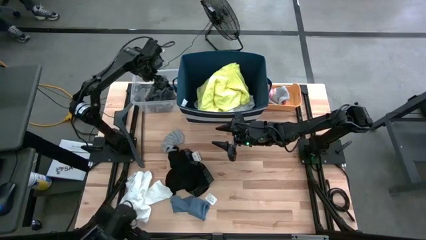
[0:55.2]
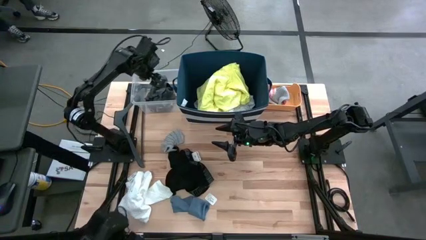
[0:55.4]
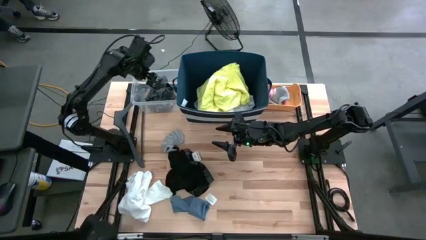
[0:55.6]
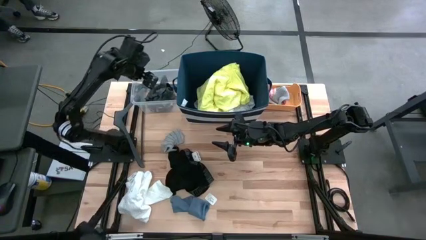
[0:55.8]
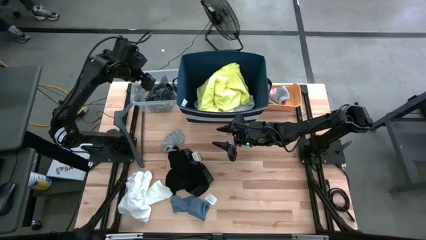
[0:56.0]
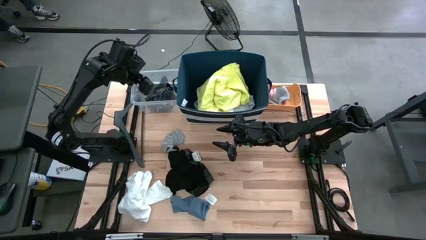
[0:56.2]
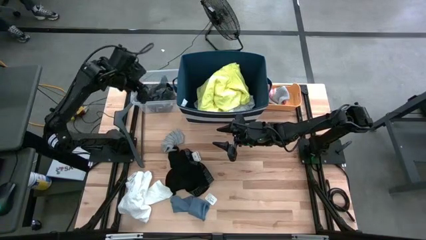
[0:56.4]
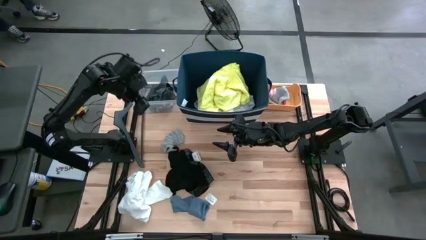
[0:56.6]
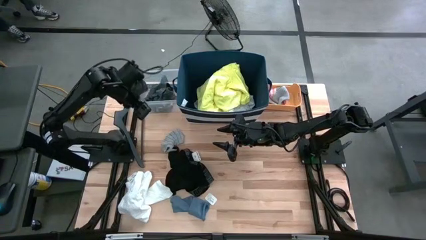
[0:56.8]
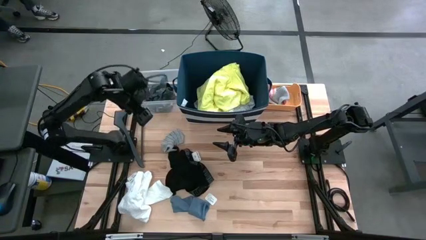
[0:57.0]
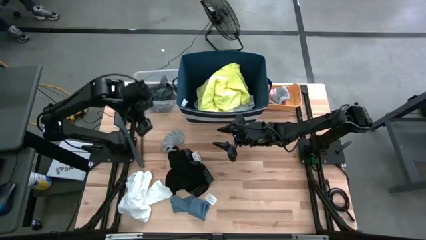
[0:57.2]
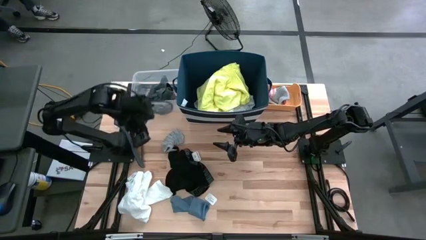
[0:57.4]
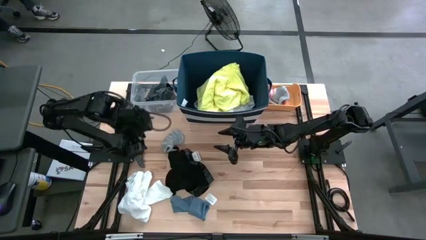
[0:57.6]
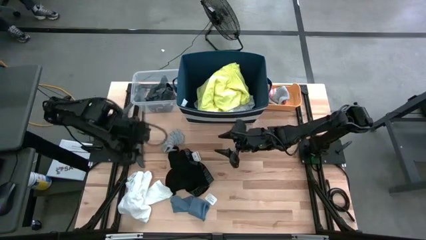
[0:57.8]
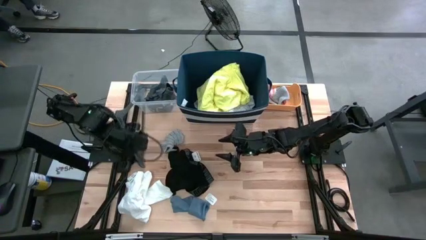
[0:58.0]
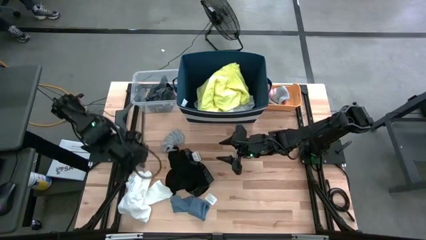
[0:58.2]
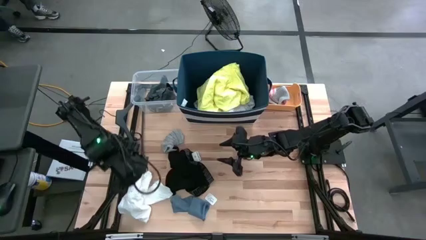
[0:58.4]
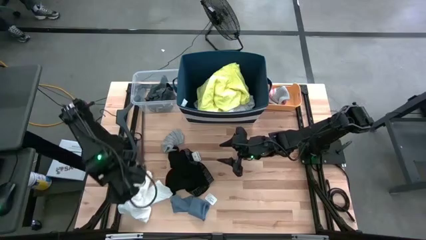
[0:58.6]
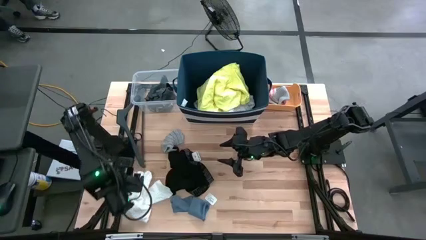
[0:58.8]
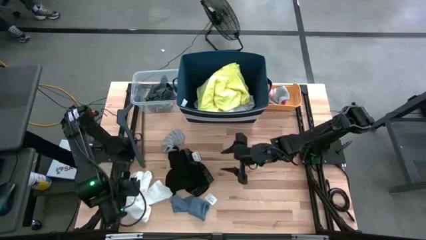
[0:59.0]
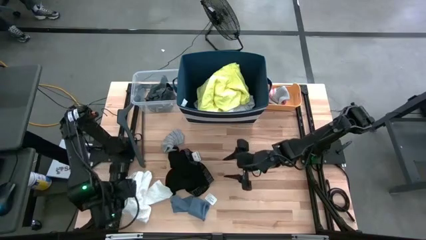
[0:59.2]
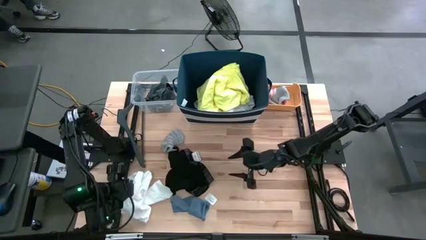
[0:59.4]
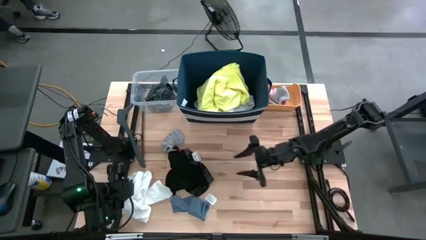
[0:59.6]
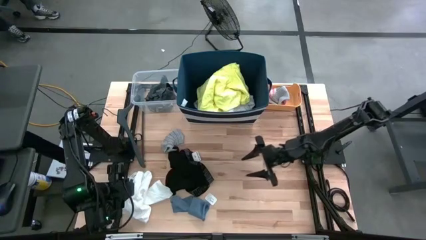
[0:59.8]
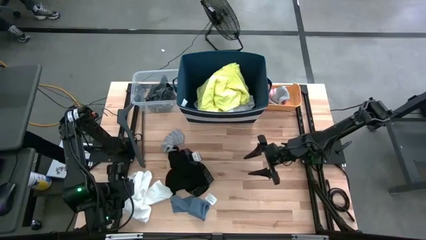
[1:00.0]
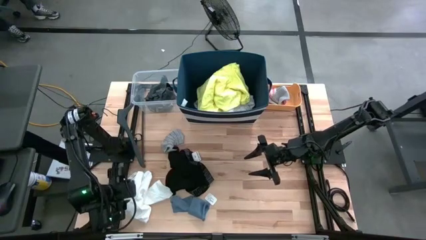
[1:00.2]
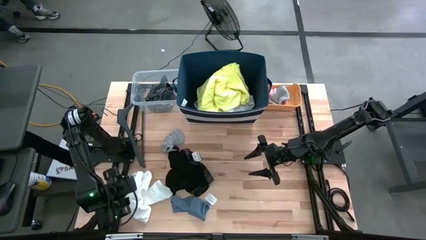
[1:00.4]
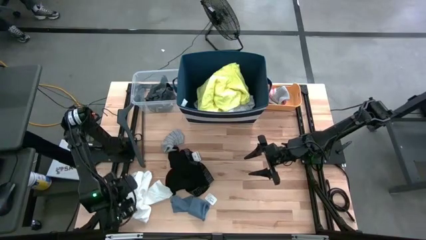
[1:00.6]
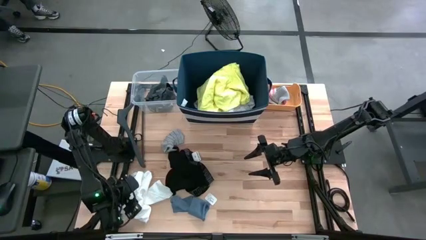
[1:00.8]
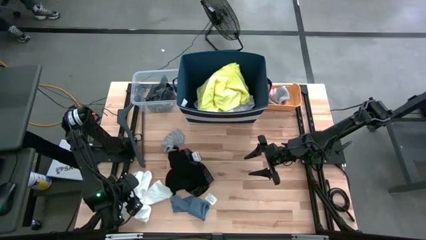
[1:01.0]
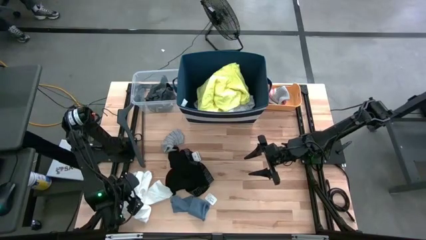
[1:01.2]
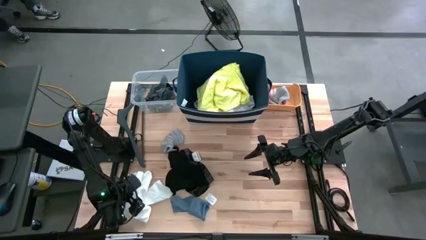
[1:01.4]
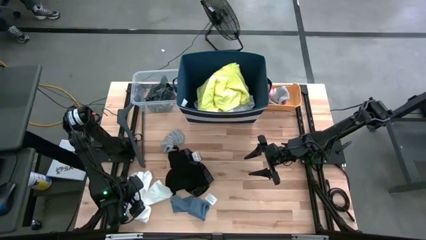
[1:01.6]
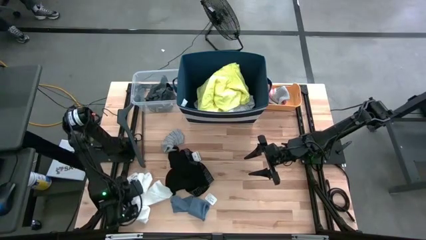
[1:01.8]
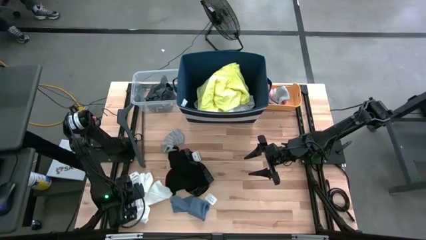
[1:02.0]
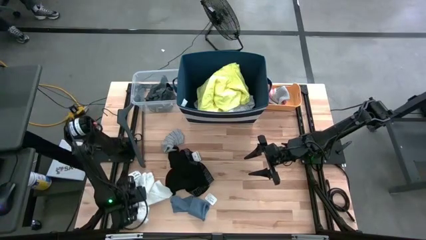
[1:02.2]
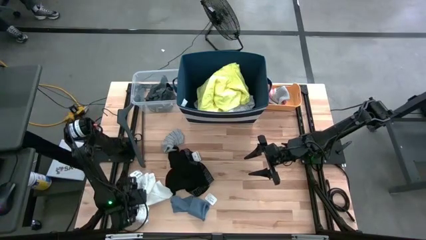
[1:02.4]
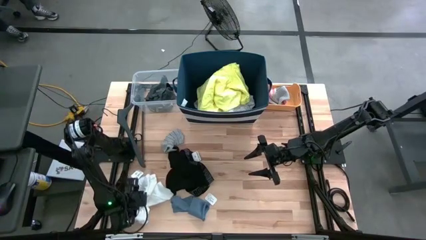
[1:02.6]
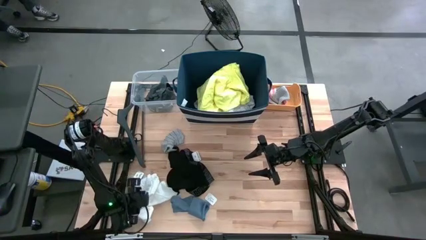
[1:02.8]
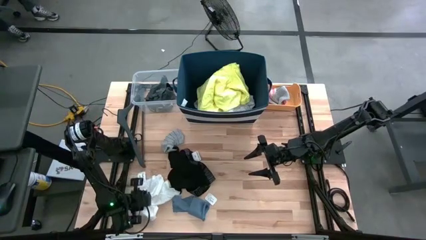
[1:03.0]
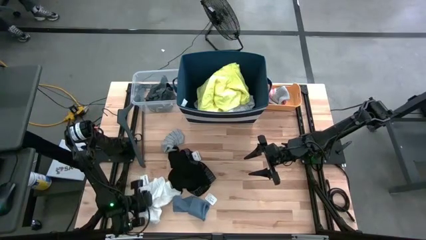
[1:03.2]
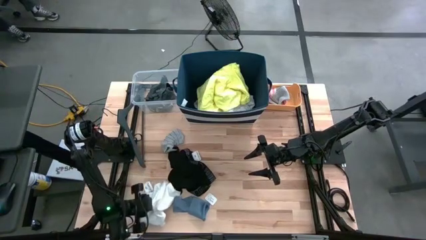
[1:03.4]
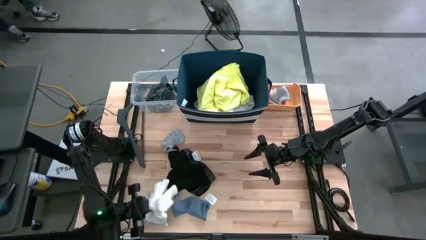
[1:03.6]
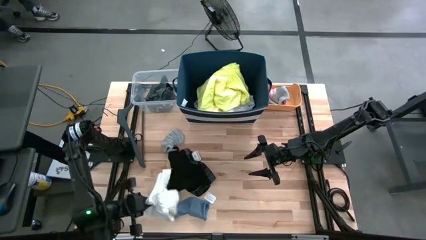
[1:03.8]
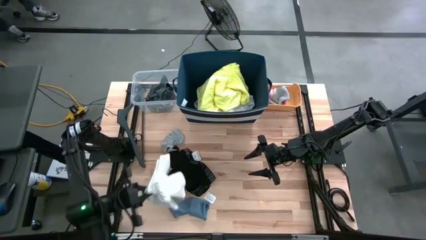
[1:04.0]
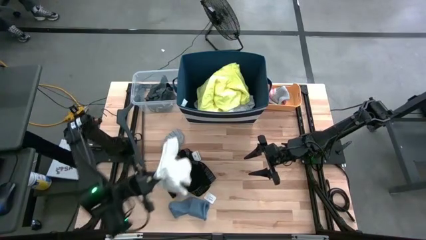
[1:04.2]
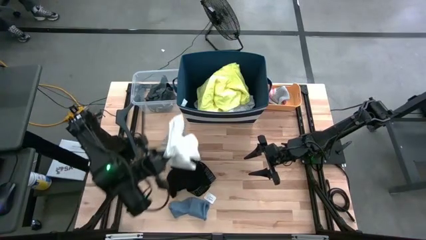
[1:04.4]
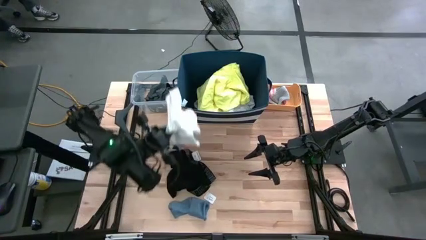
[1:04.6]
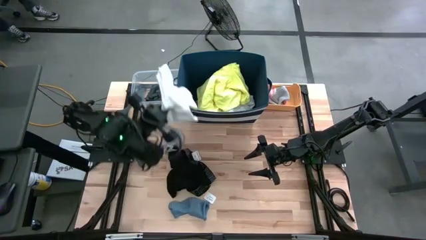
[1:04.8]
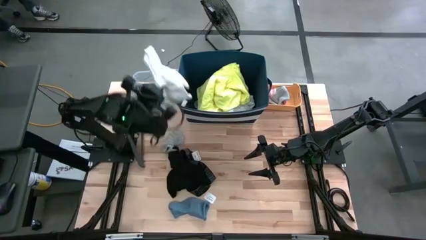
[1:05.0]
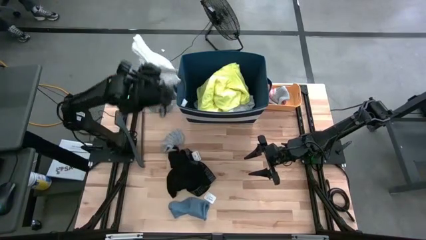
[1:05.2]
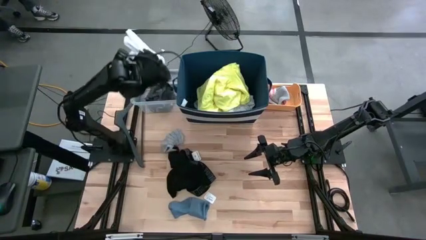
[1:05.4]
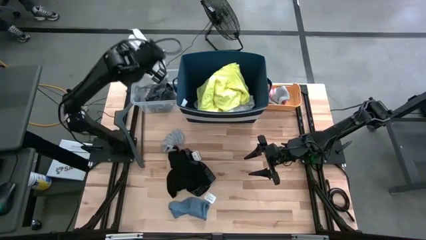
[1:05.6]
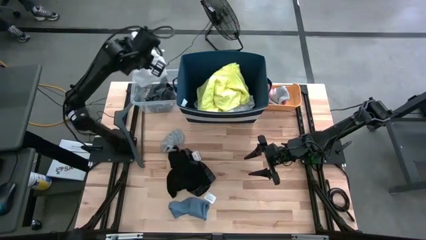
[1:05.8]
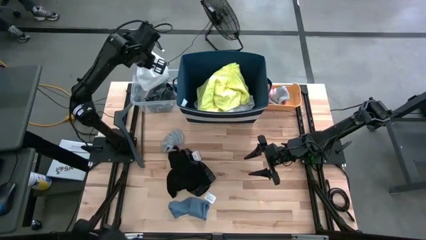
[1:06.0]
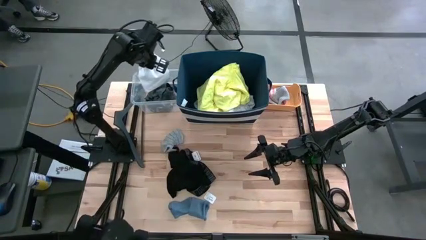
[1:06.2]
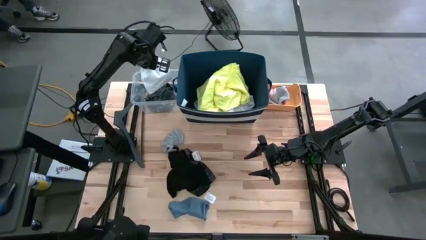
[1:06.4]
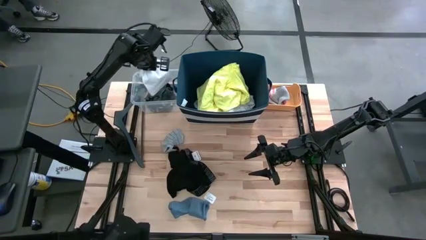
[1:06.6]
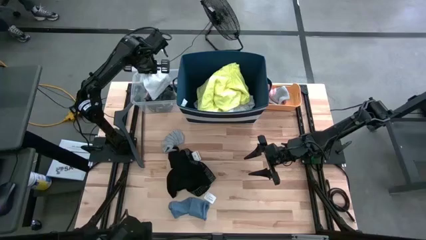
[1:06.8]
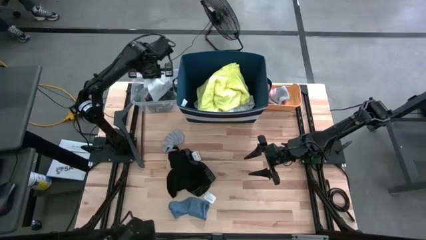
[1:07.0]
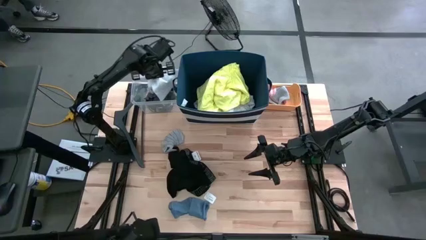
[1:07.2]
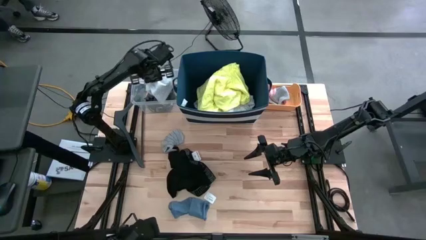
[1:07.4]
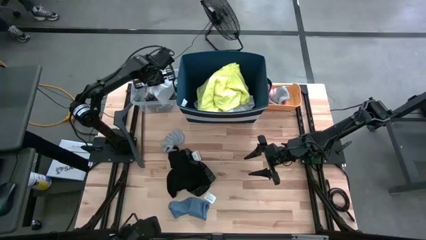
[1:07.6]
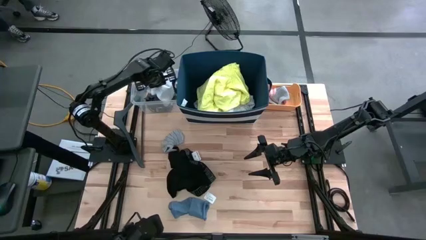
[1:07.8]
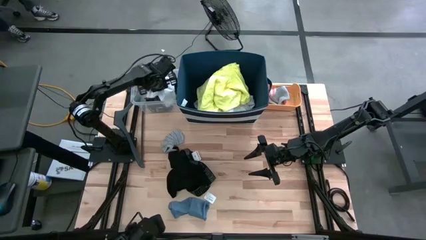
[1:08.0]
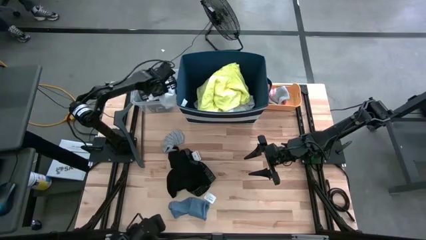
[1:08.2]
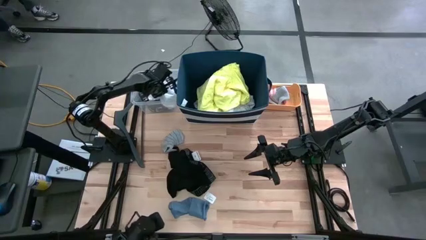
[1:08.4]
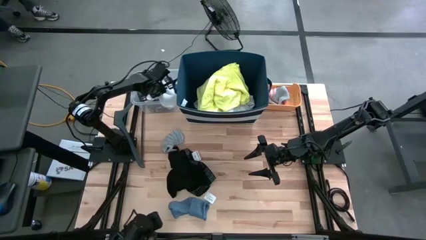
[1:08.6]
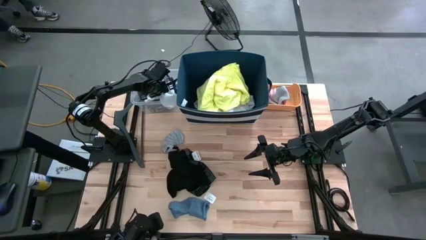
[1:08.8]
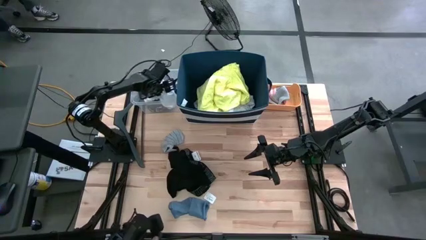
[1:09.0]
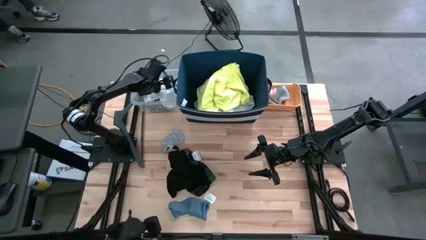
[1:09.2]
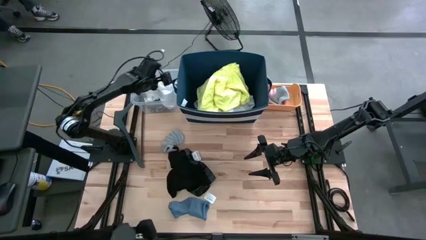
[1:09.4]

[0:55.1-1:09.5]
Task: Pick & Place Cloths
Put the white shorts into the transparent container

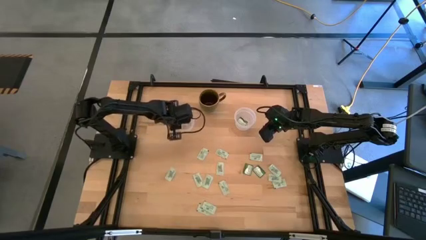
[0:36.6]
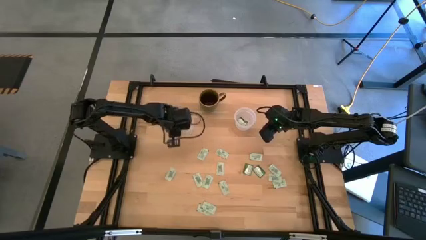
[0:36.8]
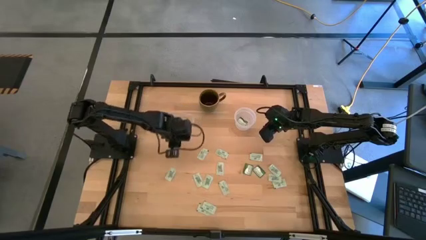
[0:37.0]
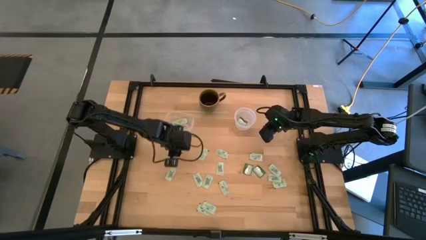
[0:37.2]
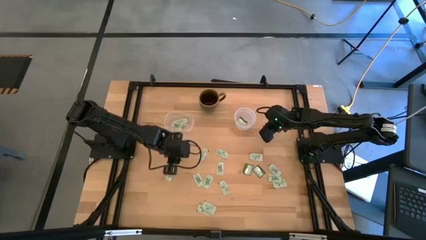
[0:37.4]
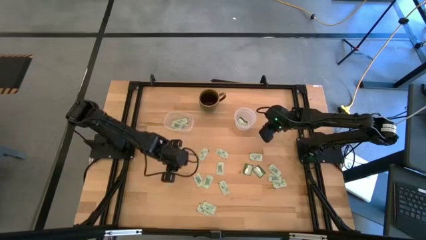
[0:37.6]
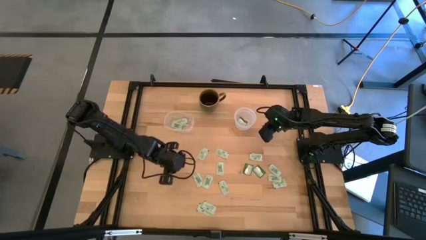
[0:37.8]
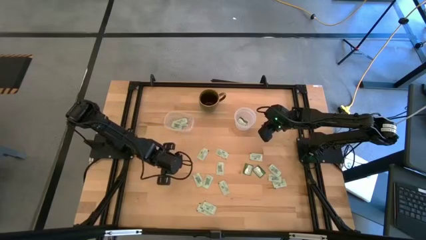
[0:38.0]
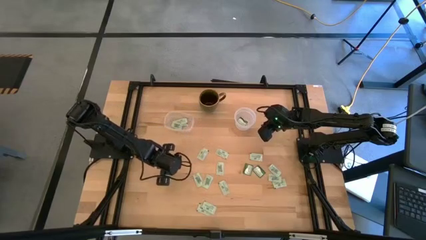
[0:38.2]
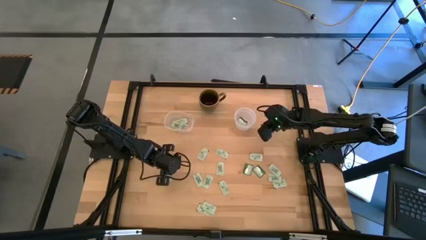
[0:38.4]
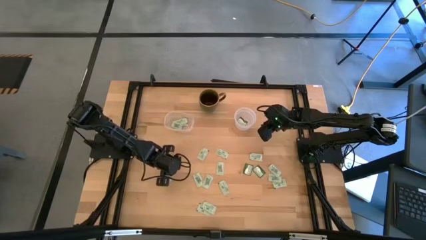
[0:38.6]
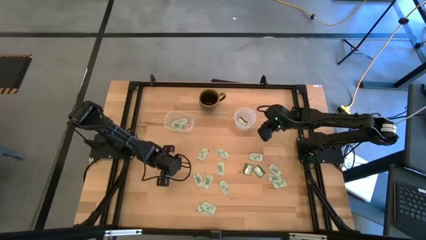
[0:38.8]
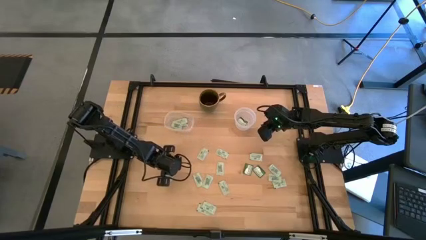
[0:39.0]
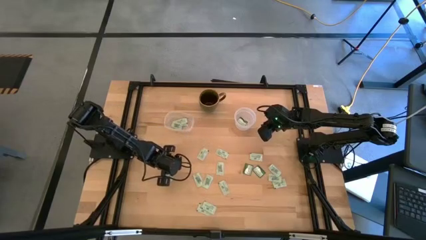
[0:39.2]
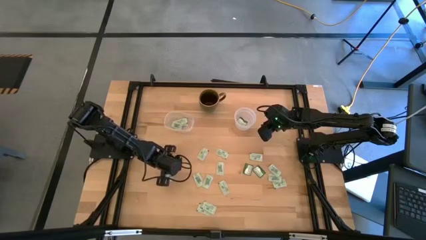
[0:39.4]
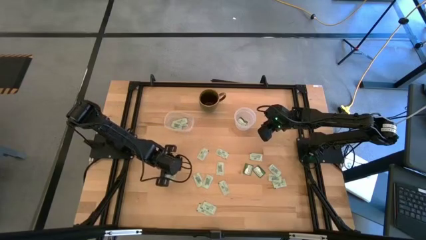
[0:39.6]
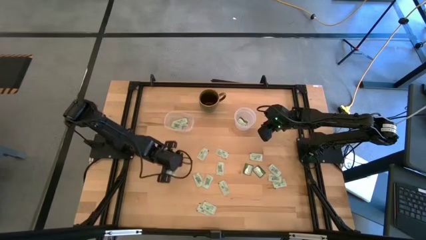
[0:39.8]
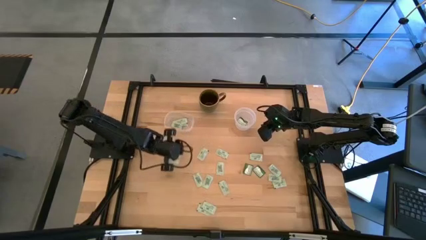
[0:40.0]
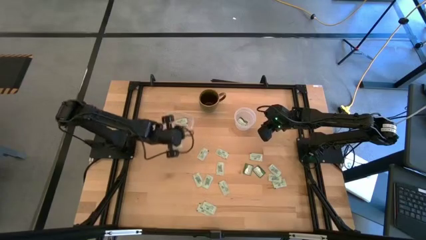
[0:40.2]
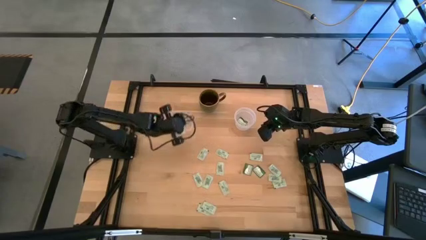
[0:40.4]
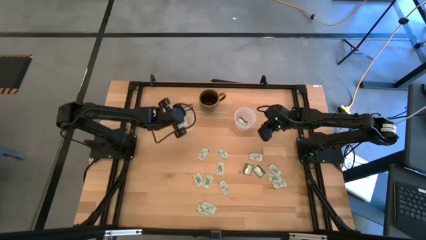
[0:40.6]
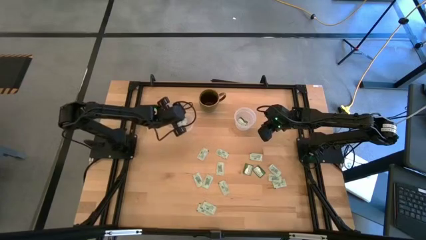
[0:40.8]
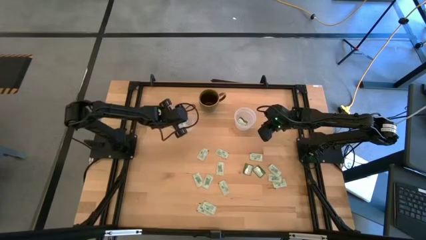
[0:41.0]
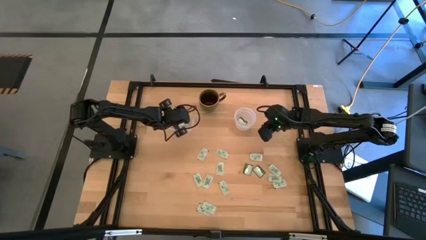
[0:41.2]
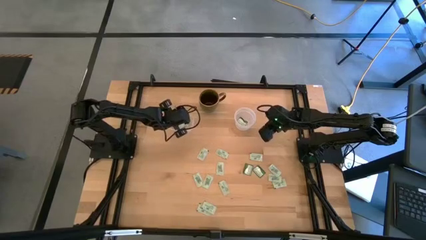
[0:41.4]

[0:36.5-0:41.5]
Task: Pick and place Stevia / Truvia into bins
Put the light green stevia packet into the left transparent container
